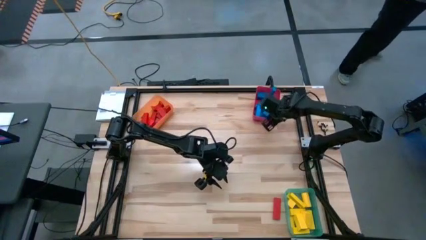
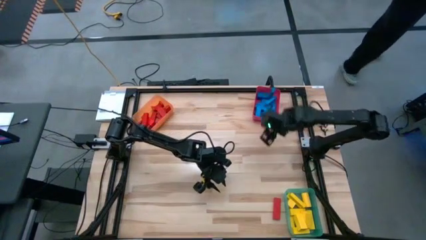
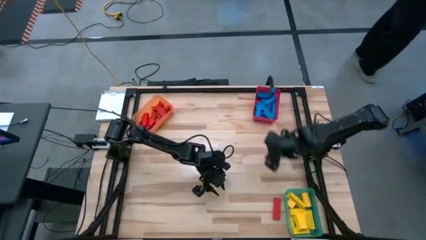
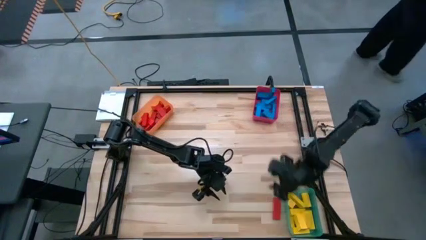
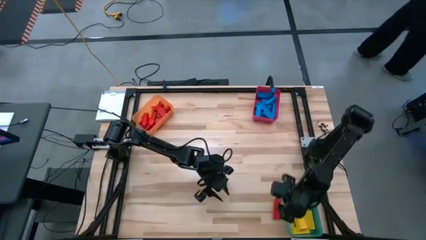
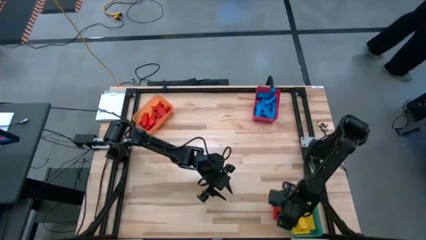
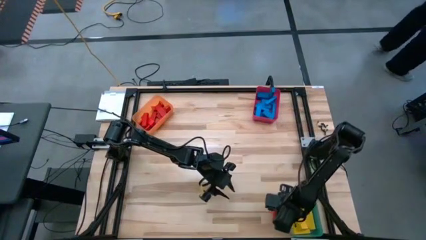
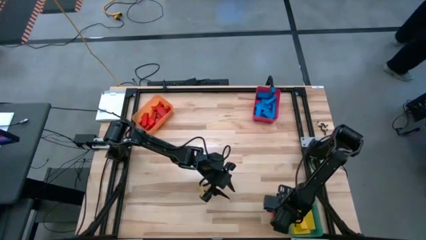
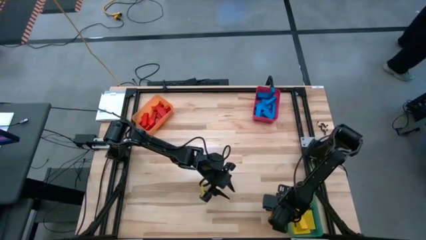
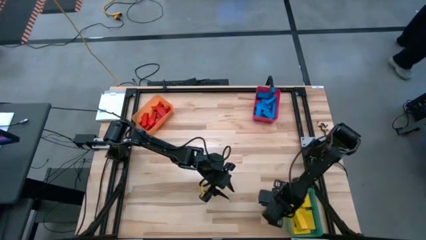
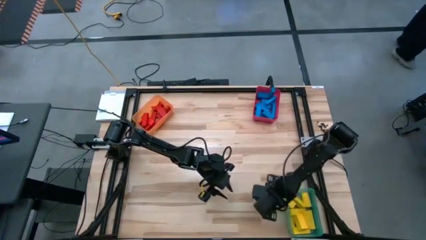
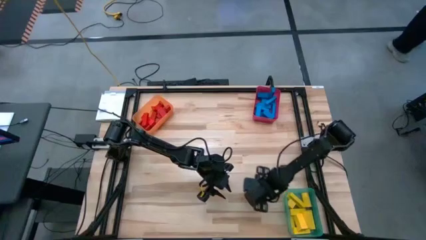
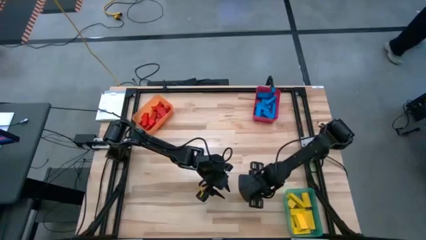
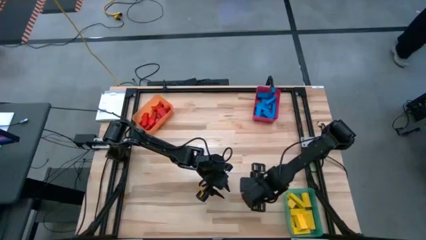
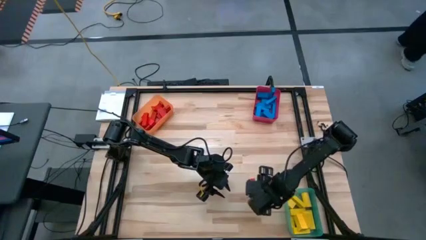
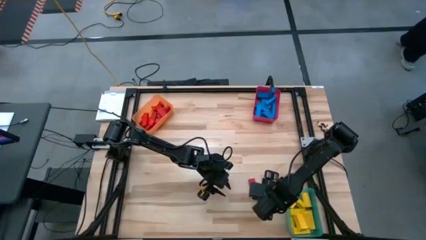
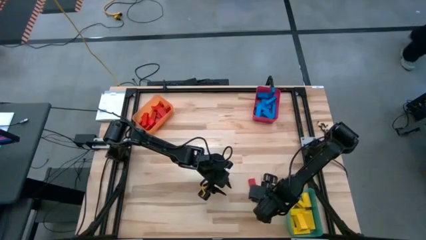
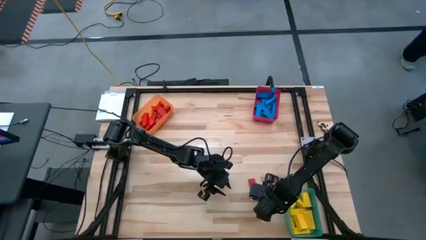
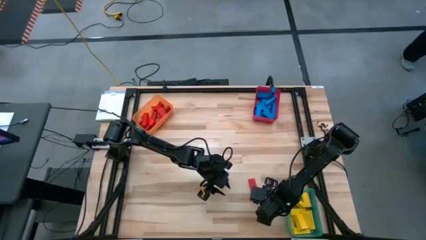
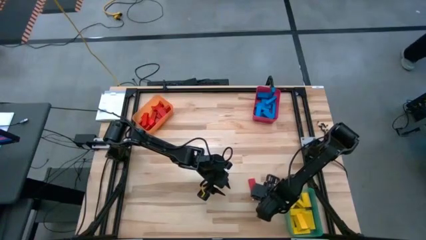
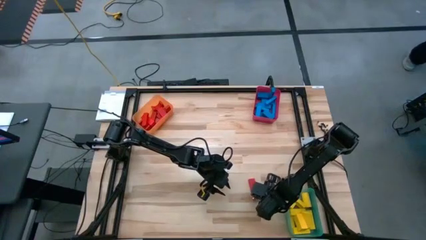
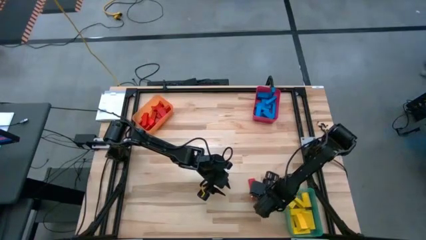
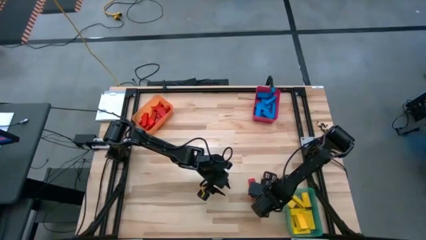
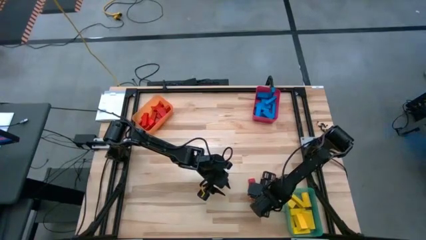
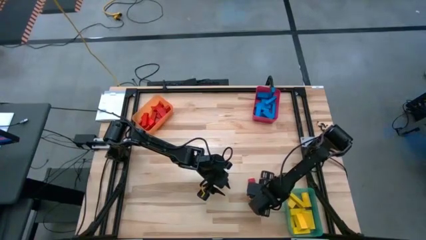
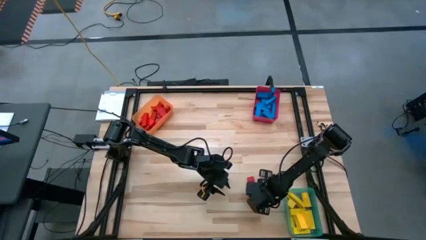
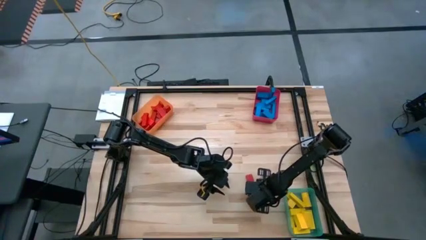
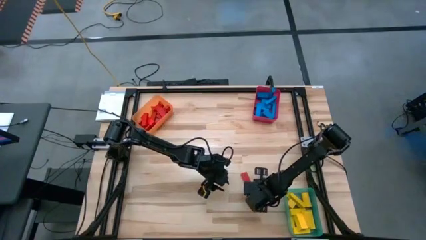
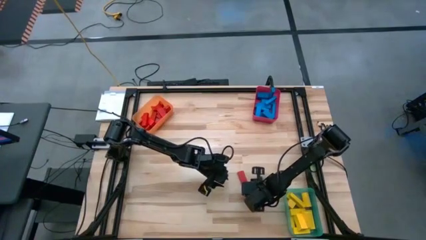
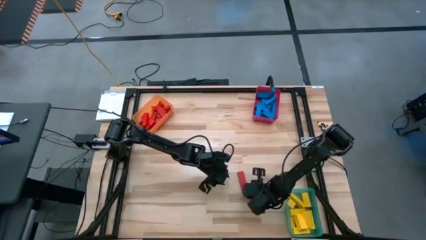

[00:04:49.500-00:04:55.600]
Task: Sort blocks
Put the red block into the orange bin

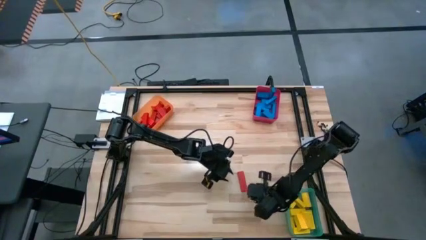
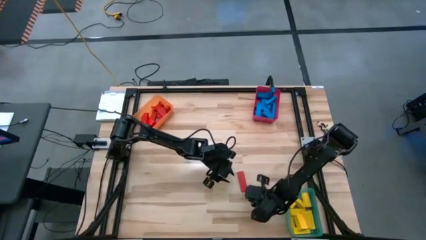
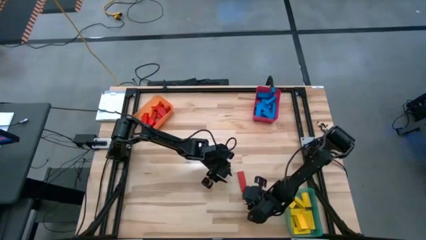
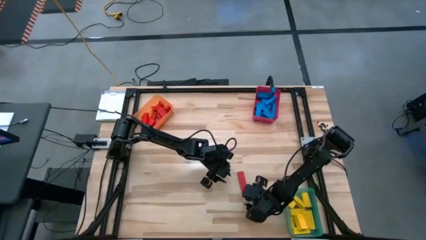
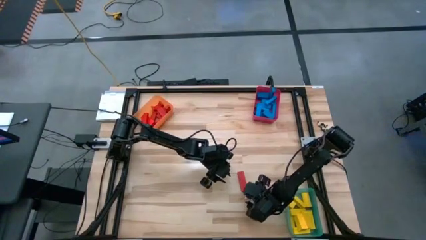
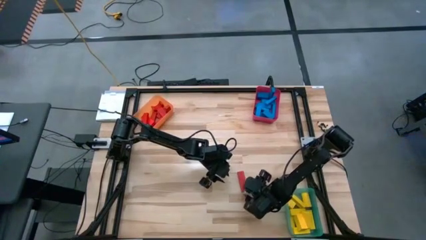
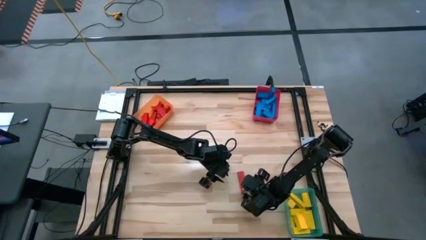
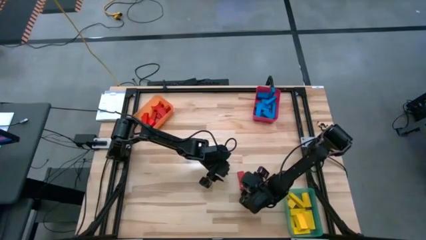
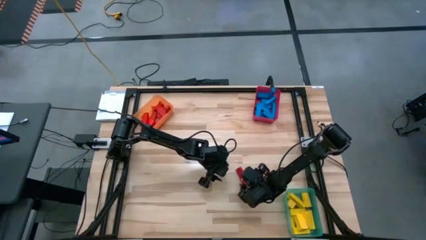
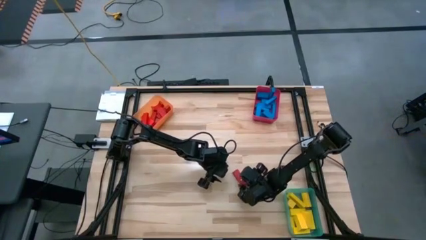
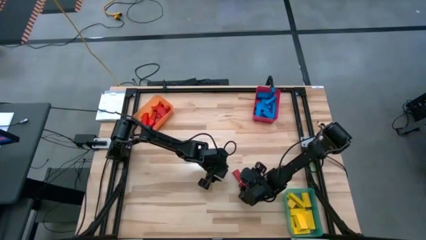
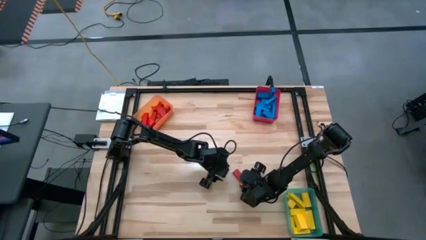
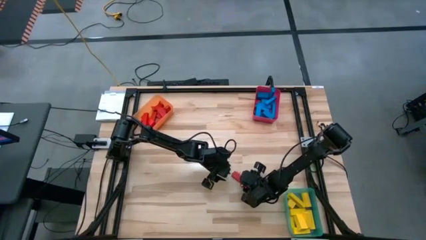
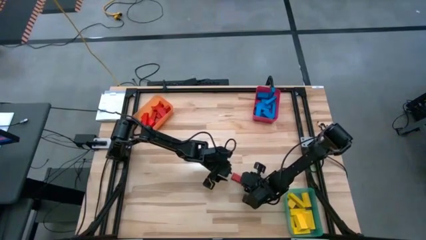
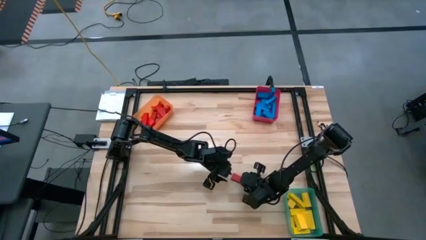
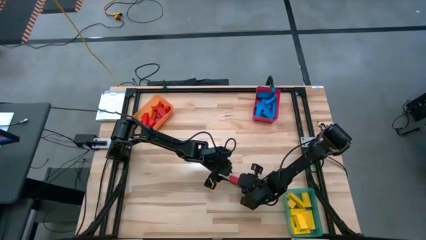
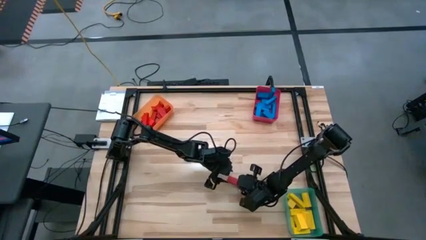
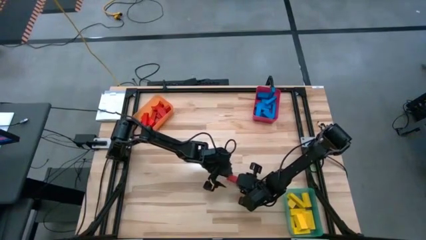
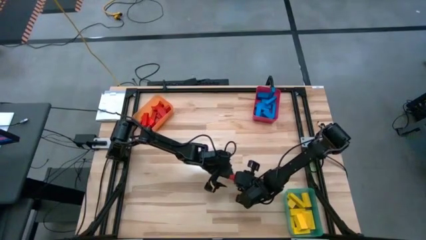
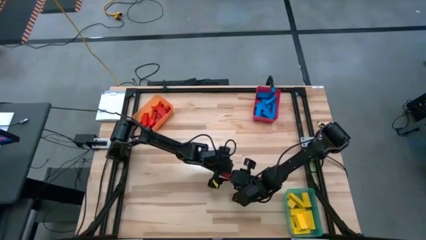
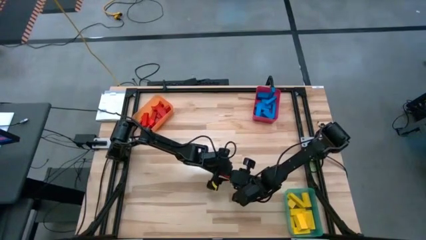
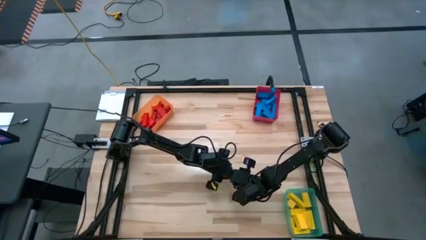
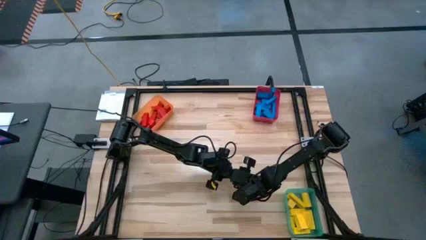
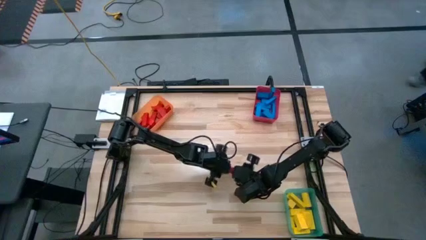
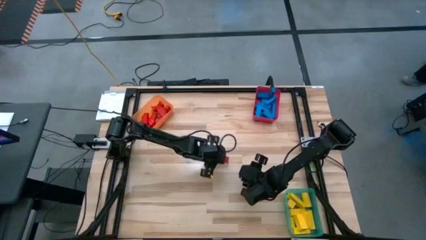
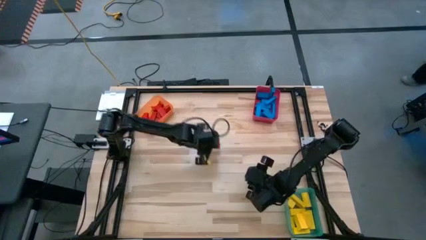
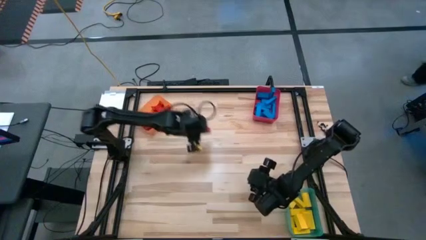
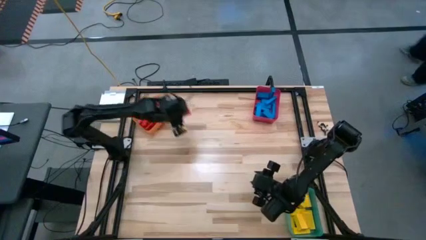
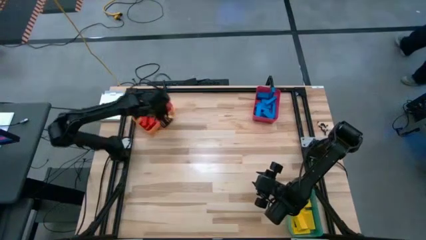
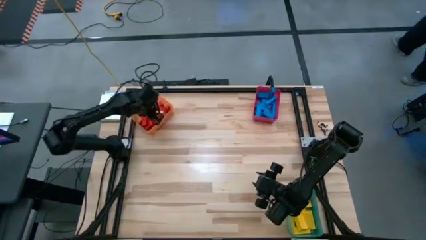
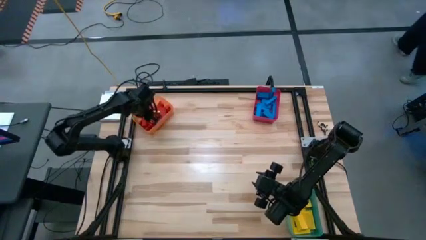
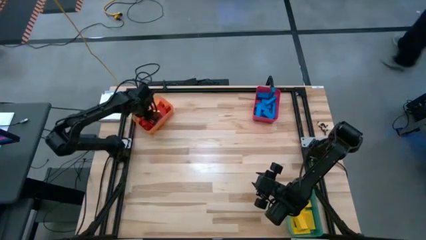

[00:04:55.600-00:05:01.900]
Put the red block into the orange bin

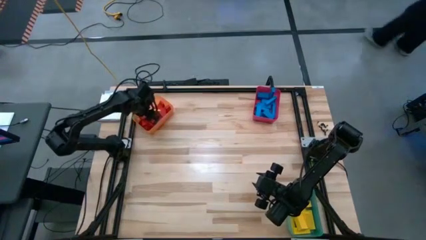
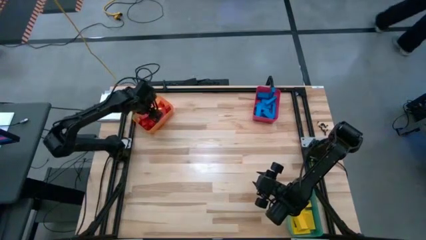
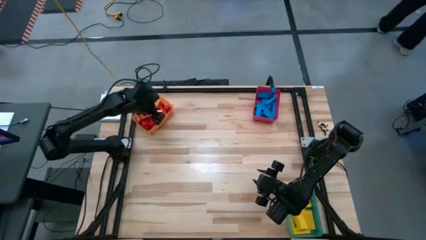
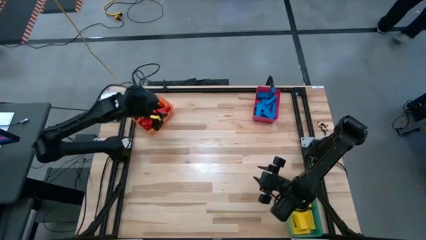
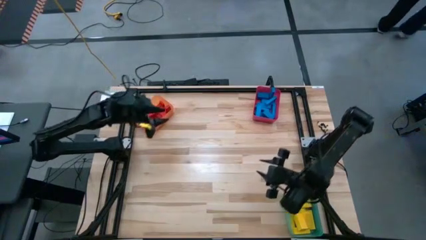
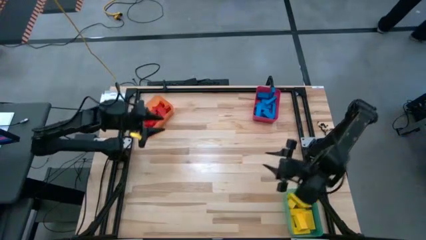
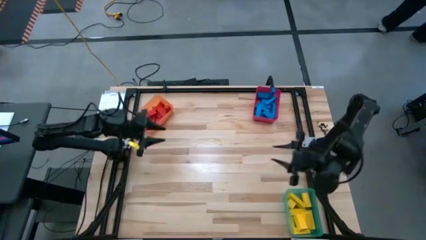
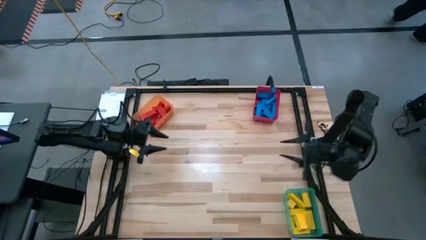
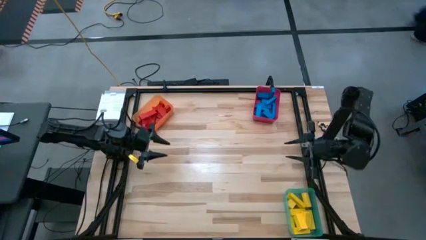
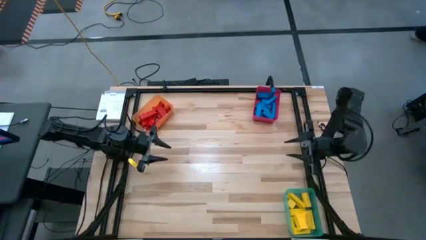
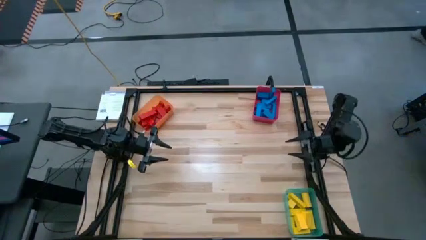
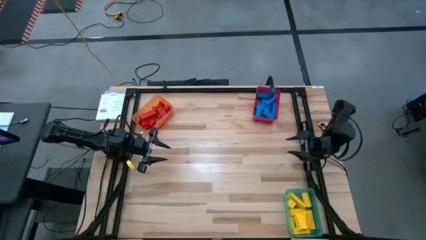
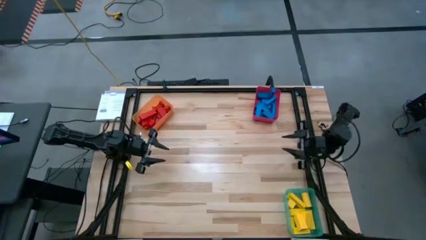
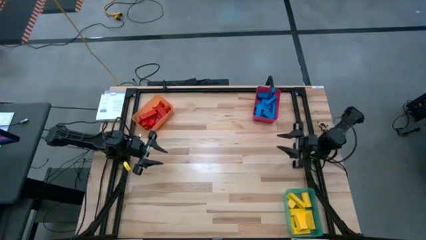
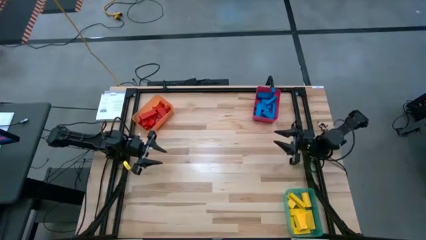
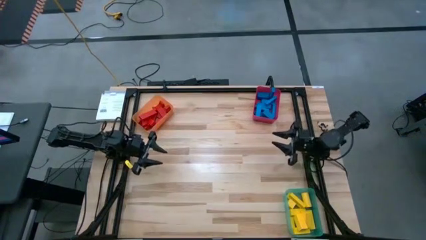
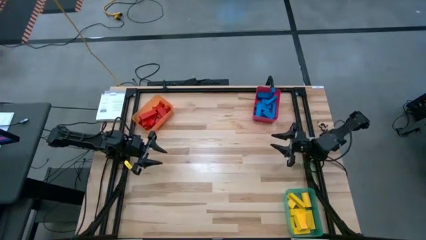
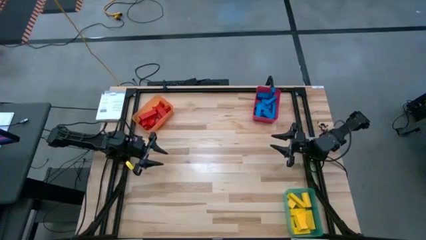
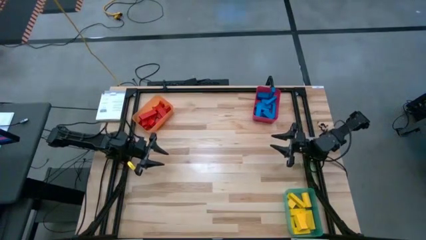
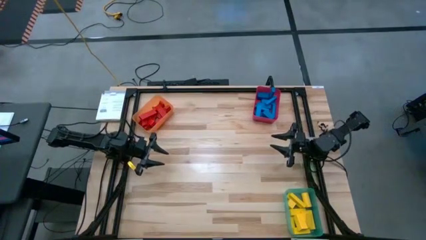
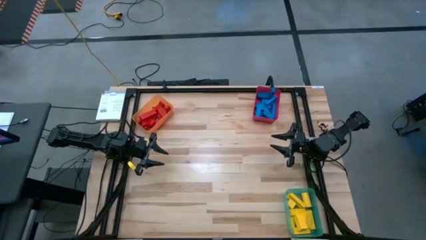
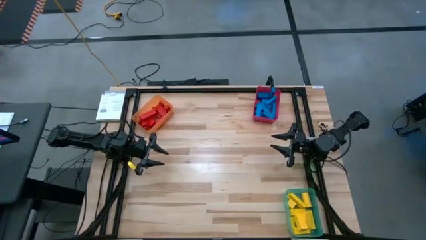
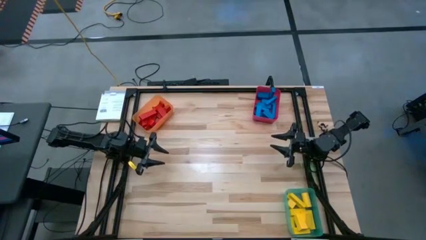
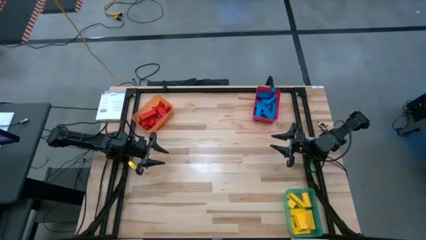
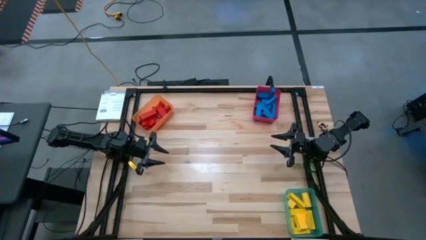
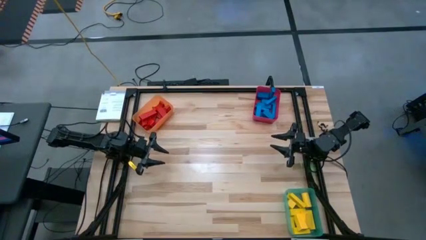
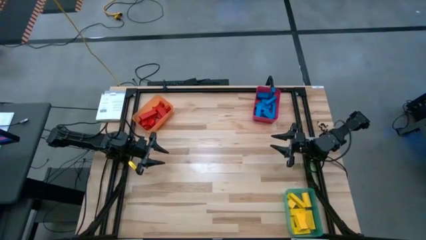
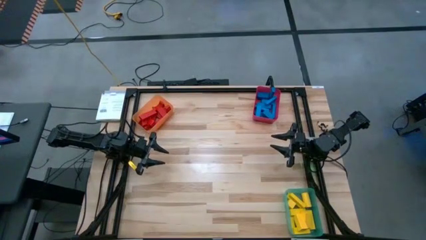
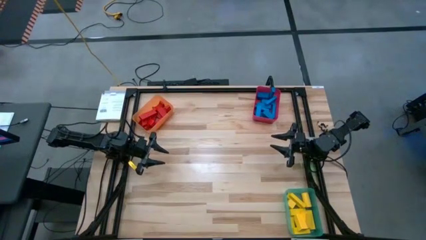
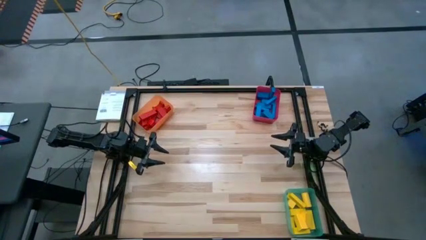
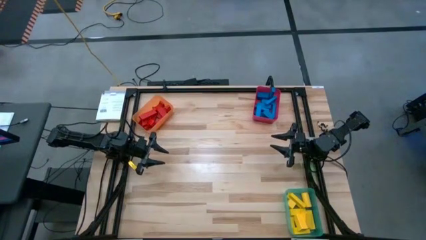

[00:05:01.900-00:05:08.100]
Return to Home Position
